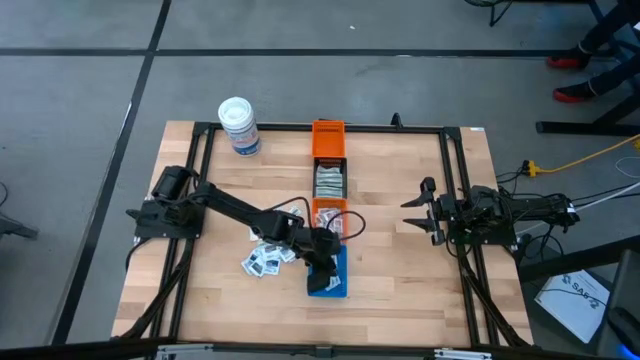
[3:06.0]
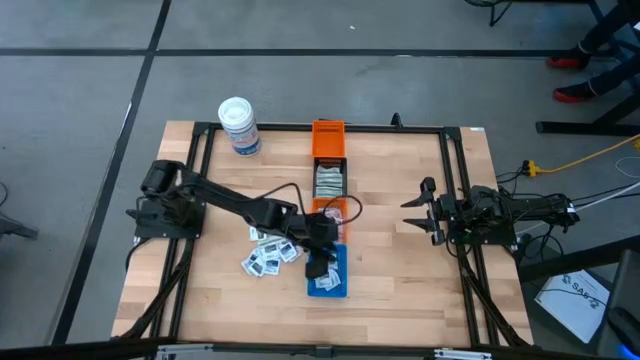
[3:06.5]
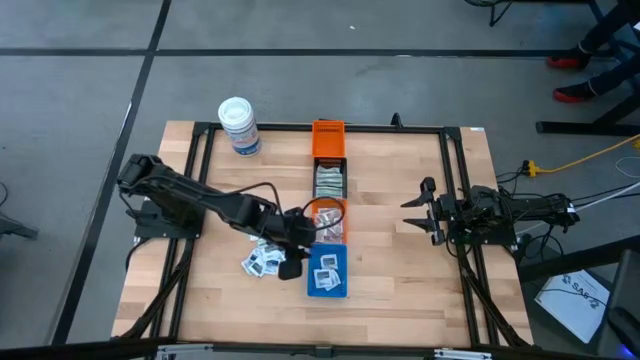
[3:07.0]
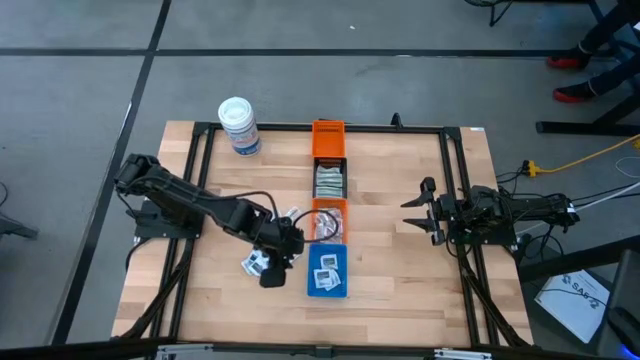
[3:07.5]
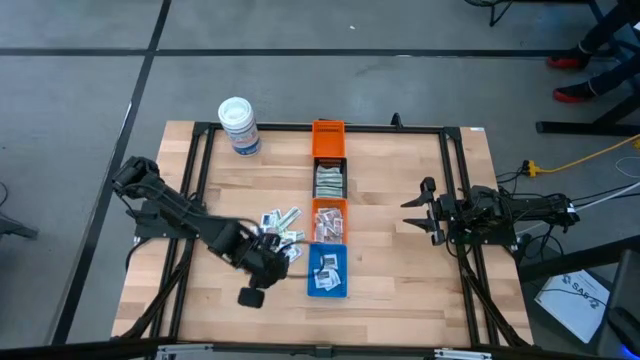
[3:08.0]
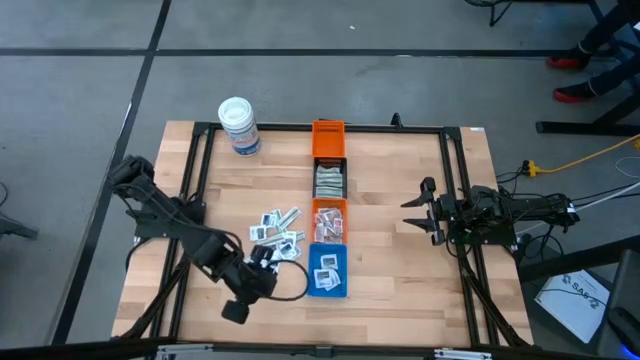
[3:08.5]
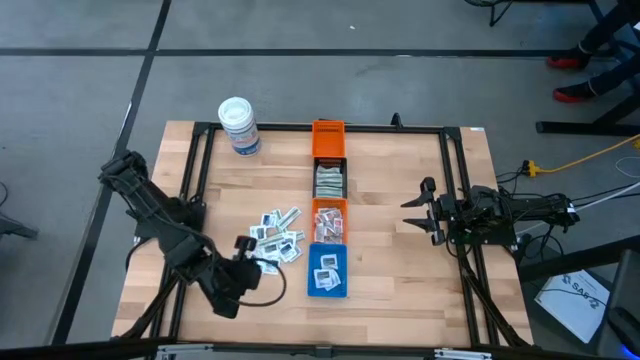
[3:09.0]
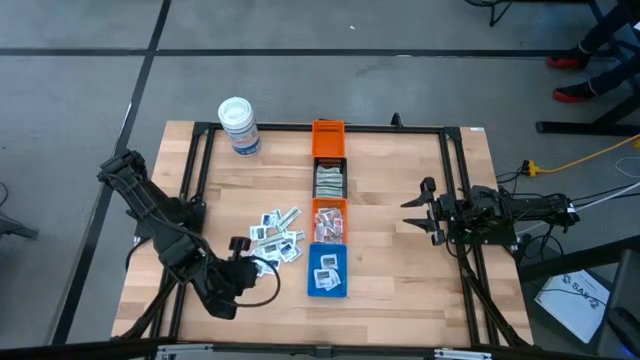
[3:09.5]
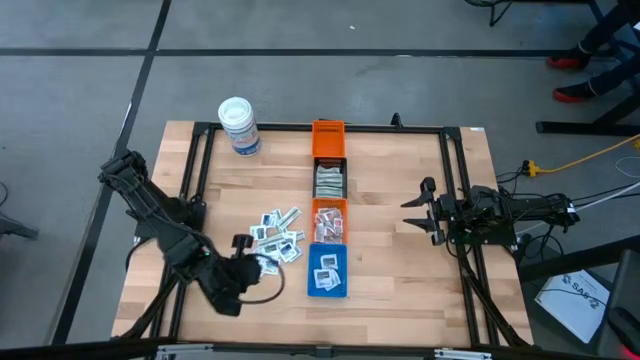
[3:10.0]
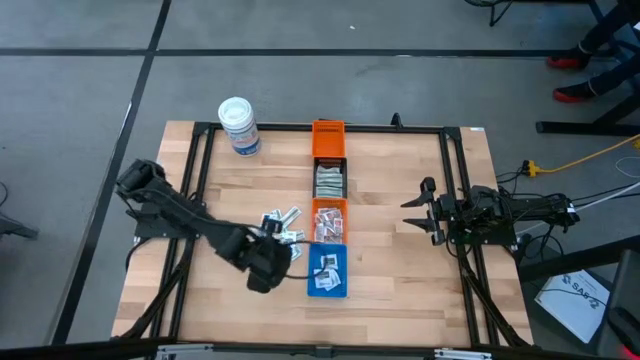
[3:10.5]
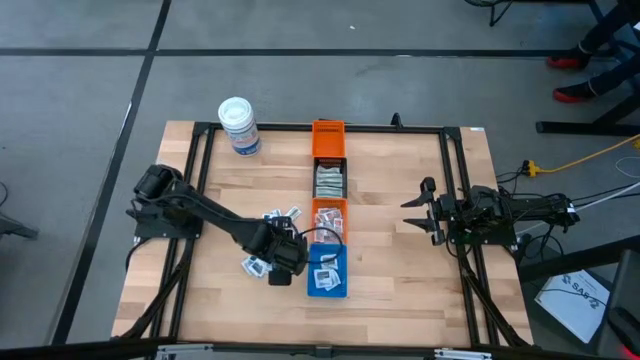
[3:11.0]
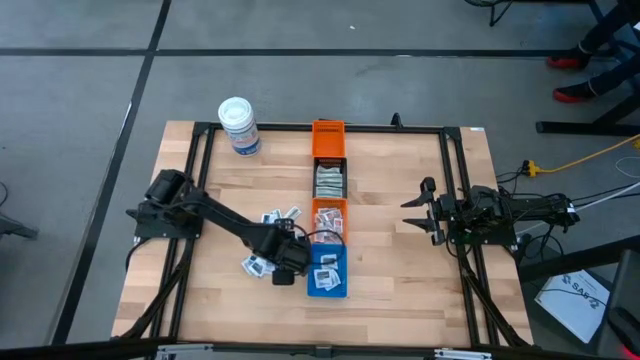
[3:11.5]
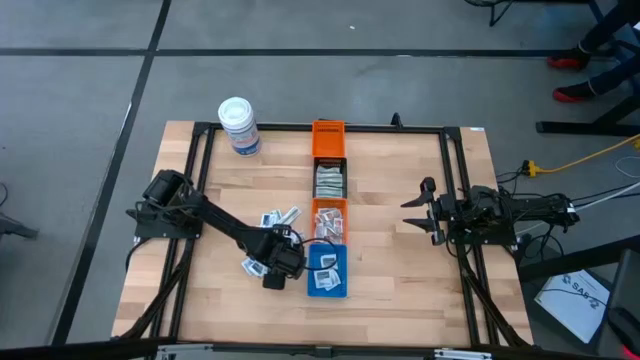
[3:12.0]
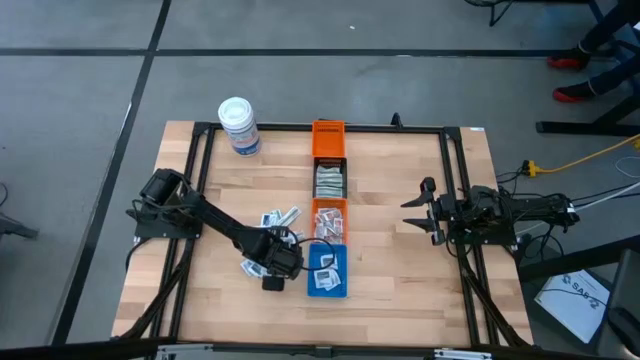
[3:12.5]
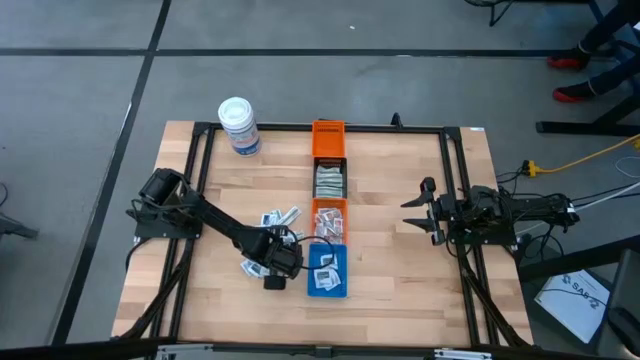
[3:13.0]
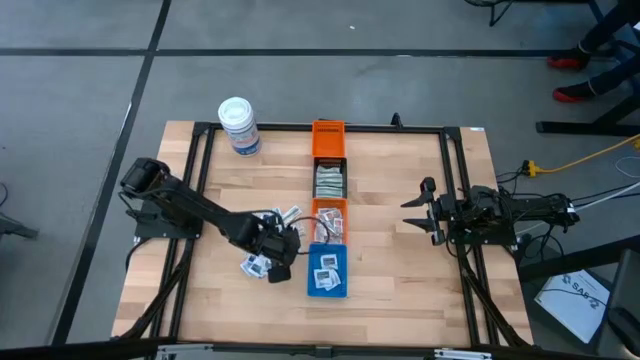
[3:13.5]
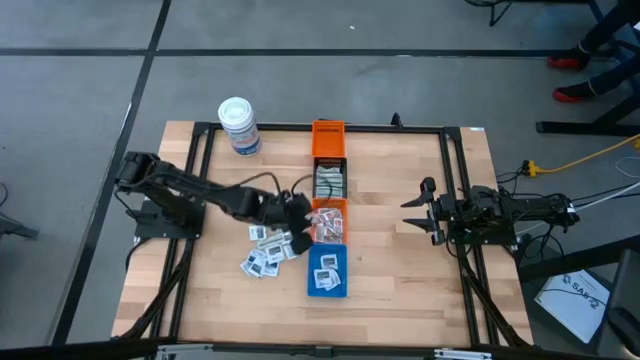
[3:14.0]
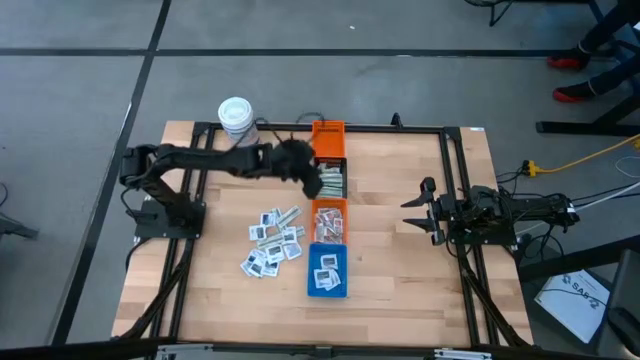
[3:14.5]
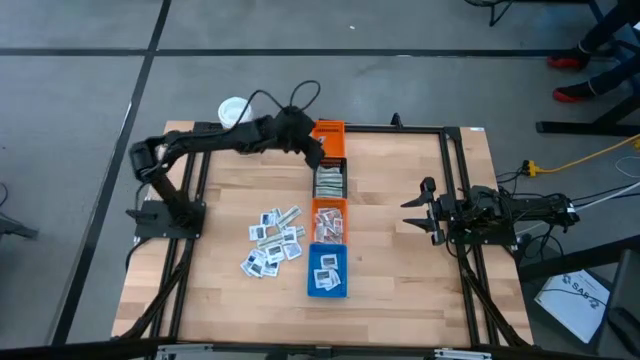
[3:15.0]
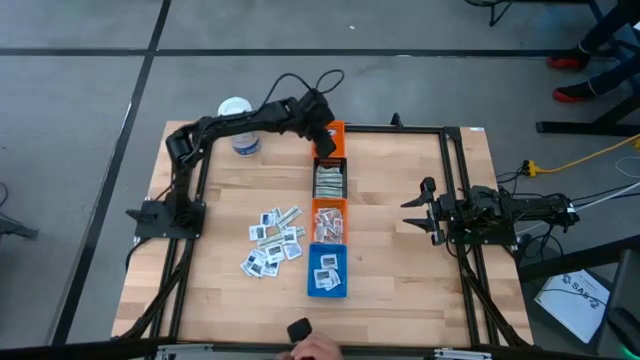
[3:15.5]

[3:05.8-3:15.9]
Task: Pick & Place First Aid Supplies
Put the blue alcohol pad into the top orange bin

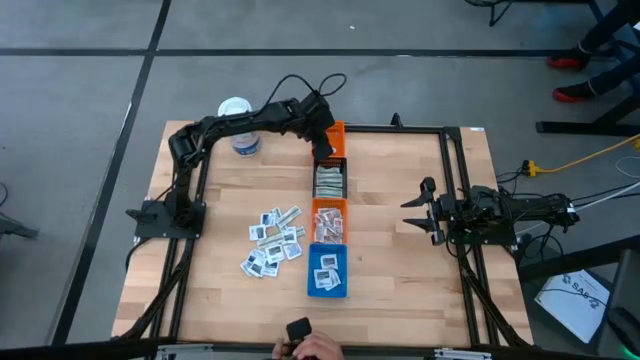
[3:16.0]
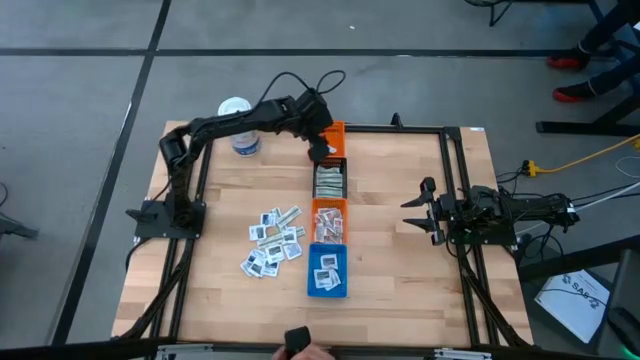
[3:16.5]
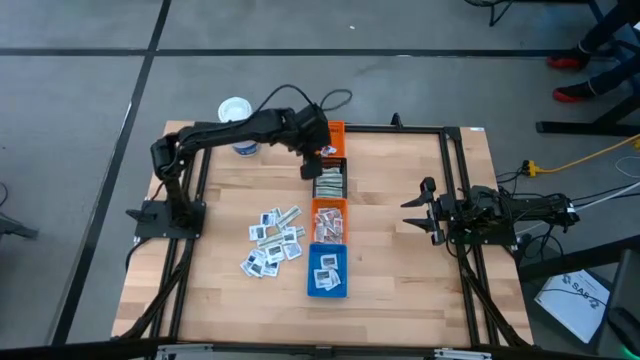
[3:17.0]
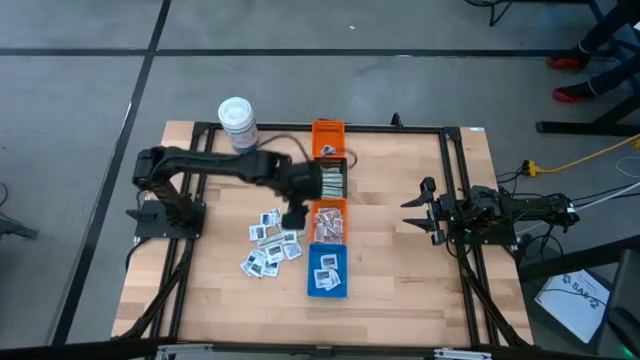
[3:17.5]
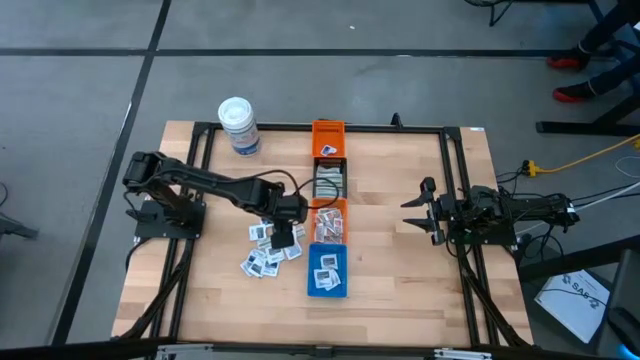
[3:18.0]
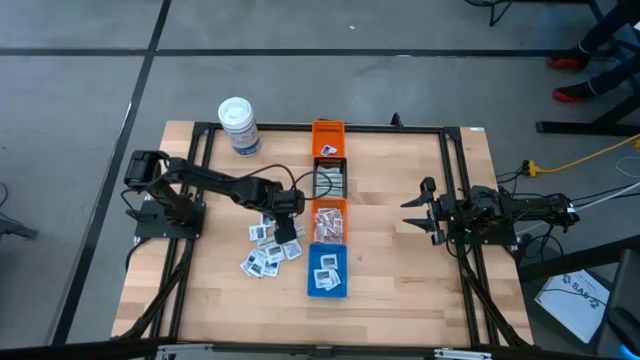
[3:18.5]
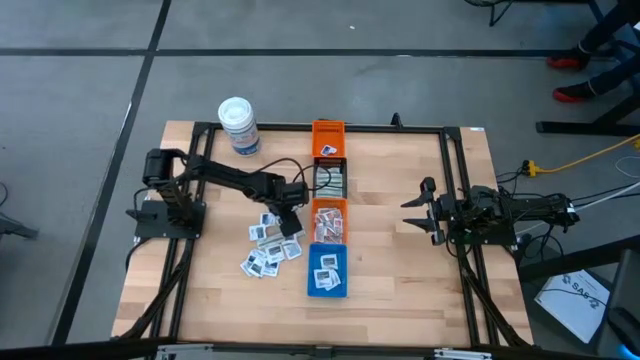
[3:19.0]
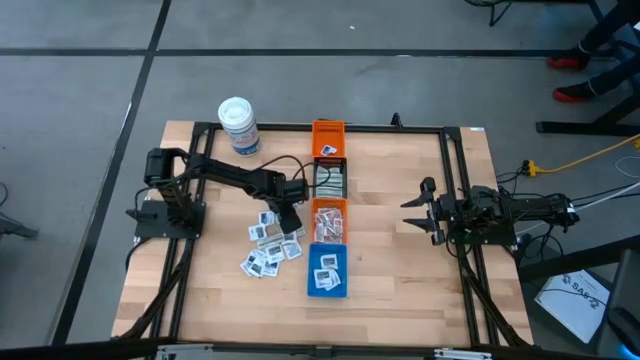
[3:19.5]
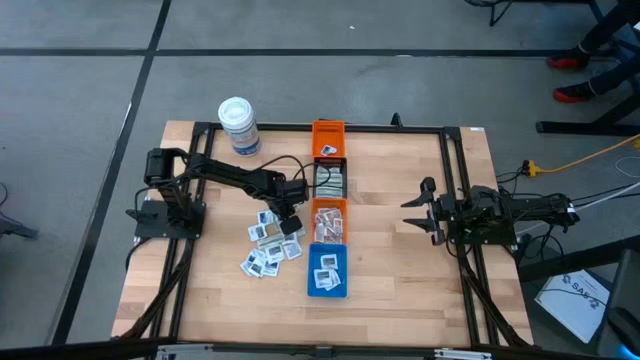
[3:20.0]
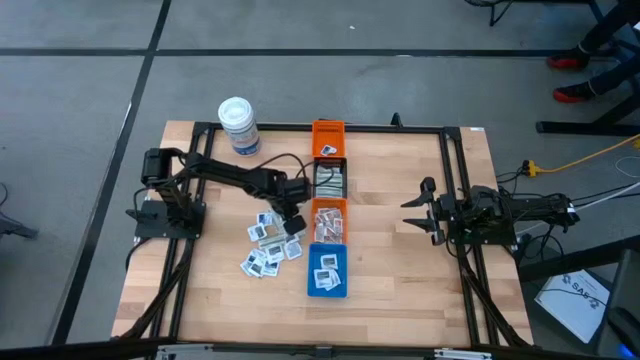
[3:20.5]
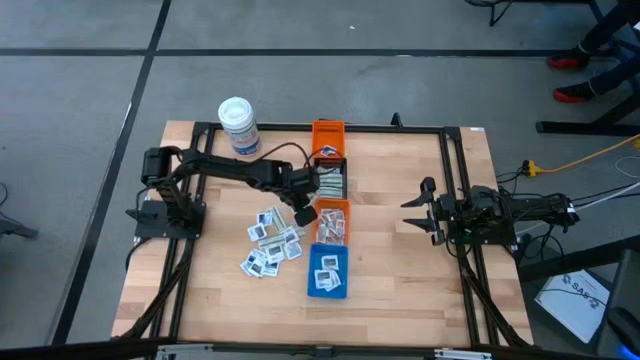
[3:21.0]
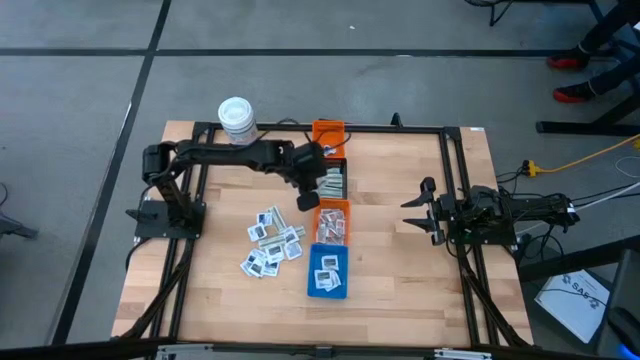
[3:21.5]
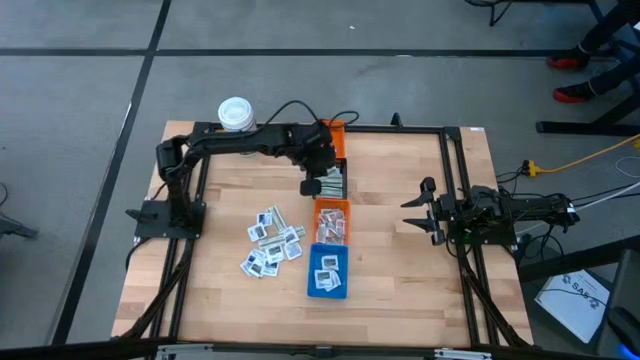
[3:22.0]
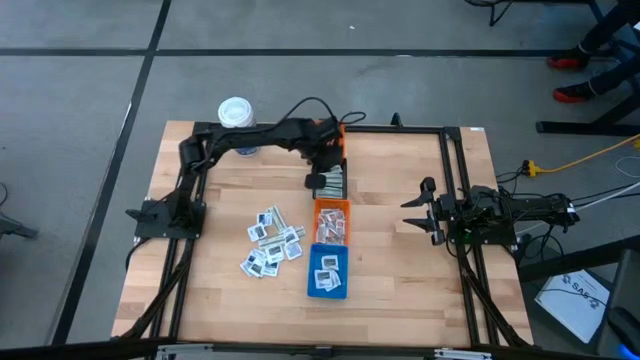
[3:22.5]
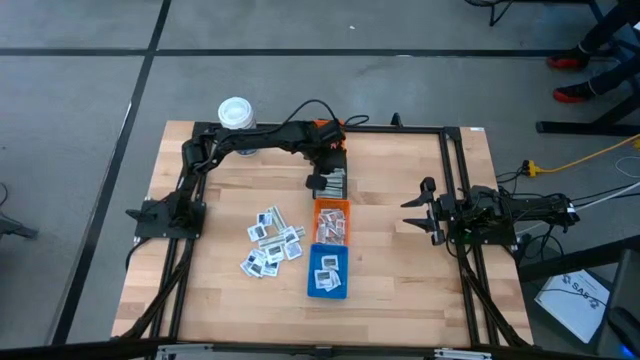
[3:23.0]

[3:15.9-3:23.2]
Put the green bandage into the black bin

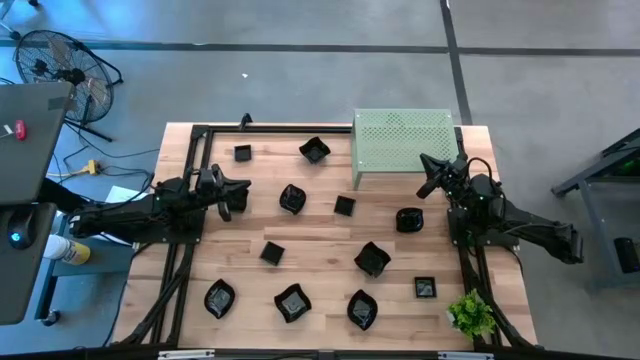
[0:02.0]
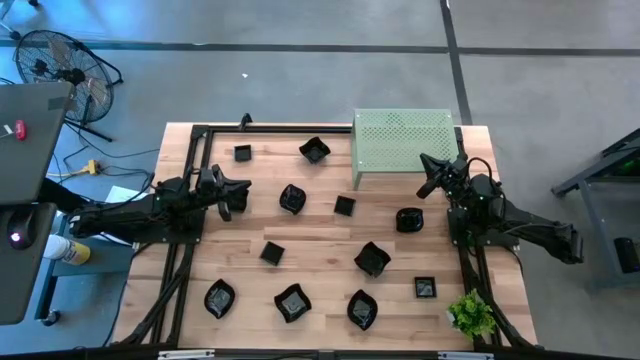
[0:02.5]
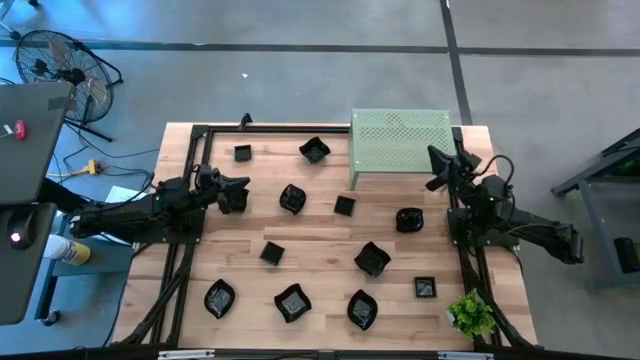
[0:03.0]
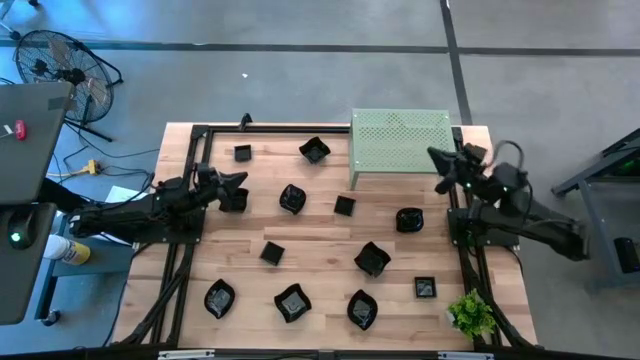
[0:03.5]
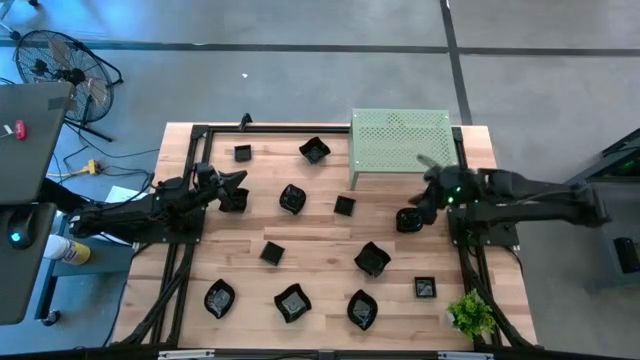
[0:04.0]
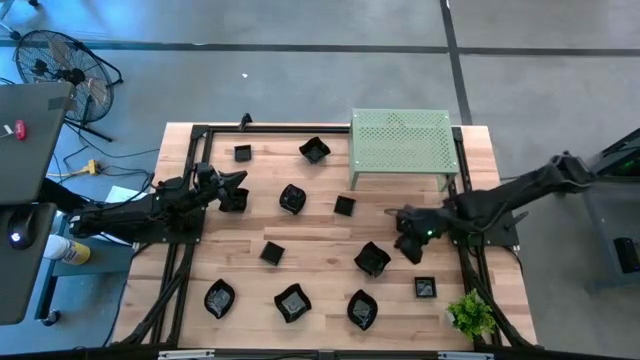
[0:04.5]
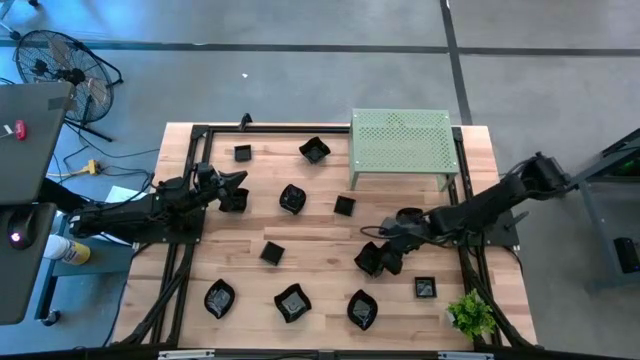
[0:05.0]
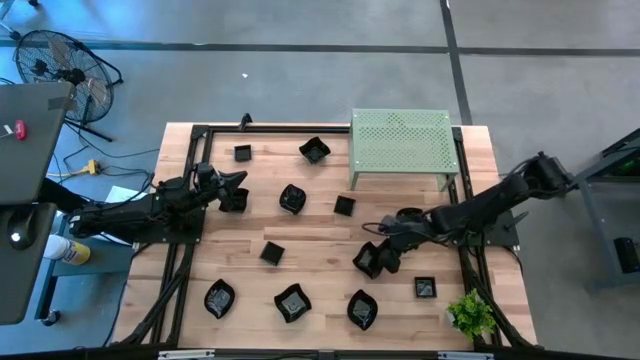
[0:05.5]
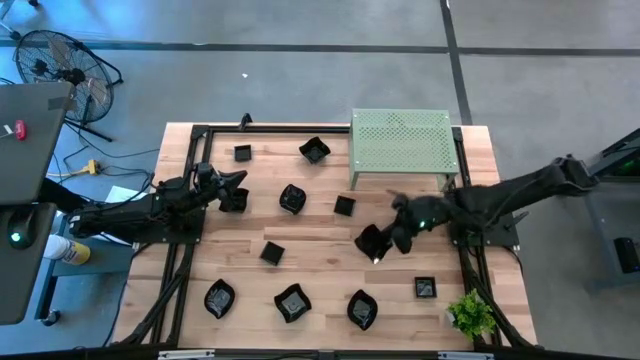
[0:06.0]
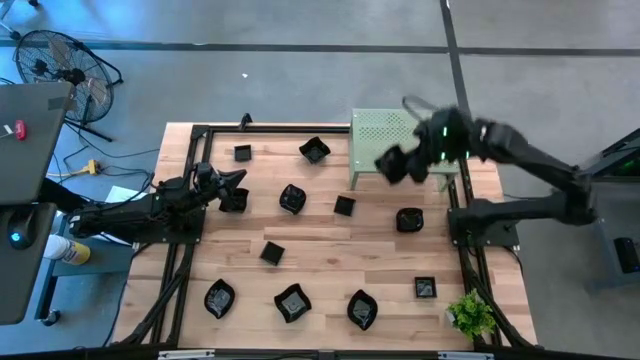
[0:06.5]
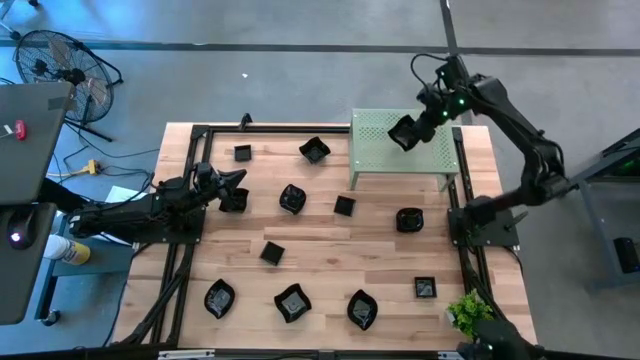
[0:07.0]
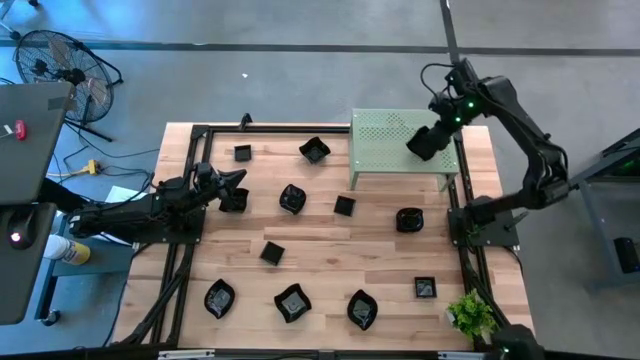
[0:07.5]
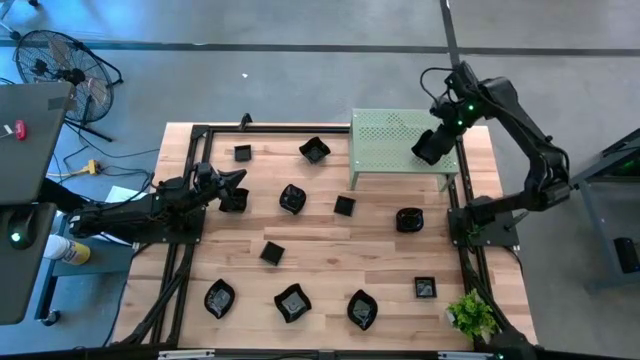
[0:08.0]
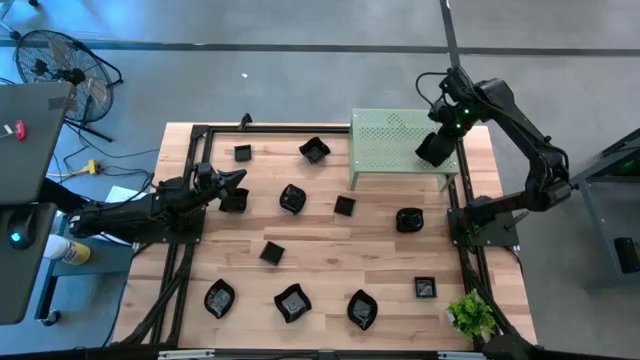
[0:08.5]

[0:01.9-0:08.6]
Task: Pick & Place Mini shaped plates
Put the black distorted square plate on the shelf
